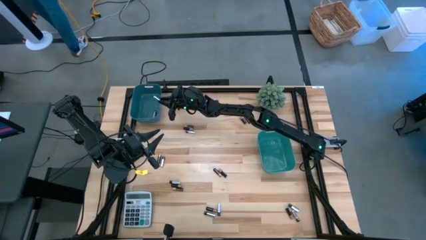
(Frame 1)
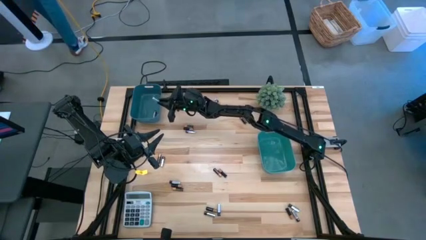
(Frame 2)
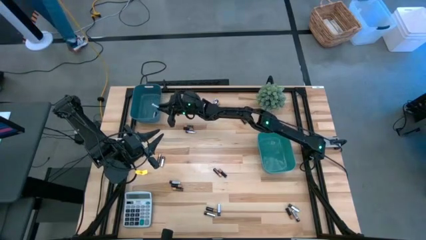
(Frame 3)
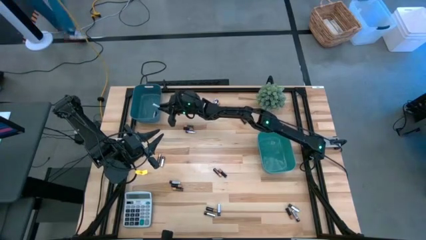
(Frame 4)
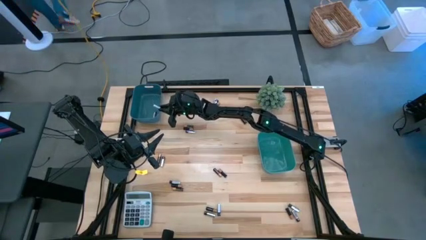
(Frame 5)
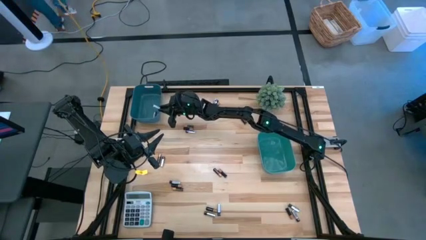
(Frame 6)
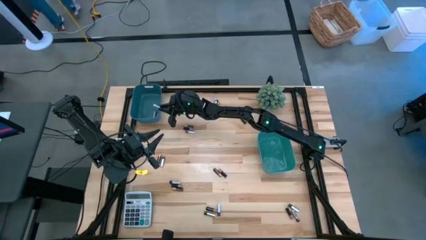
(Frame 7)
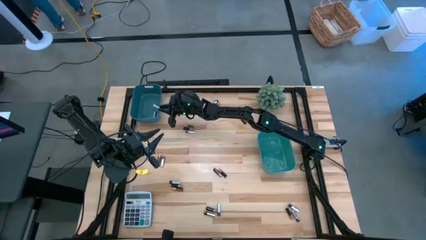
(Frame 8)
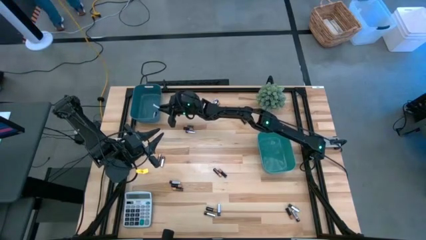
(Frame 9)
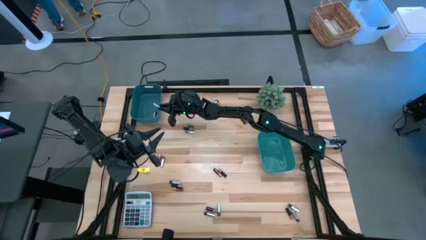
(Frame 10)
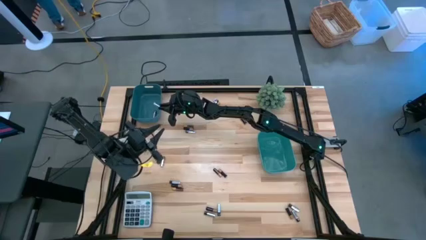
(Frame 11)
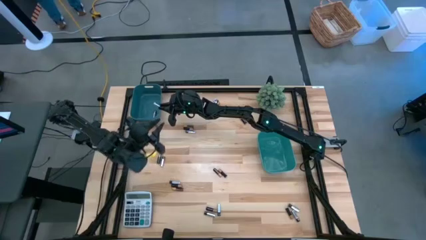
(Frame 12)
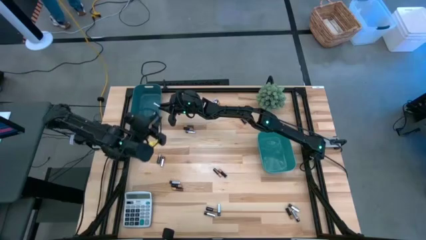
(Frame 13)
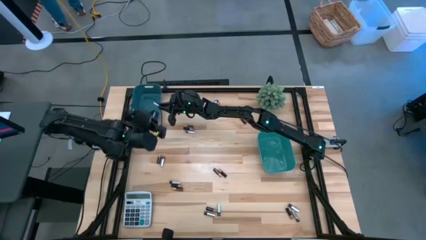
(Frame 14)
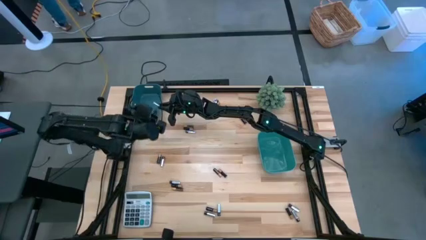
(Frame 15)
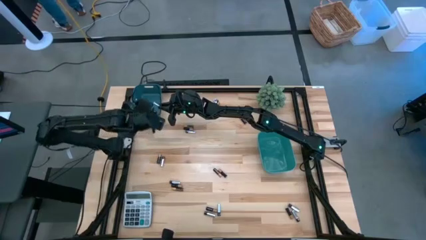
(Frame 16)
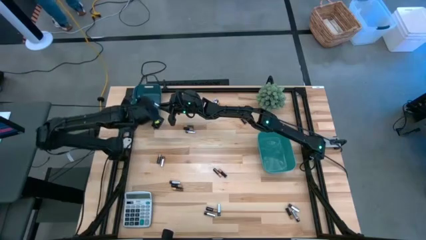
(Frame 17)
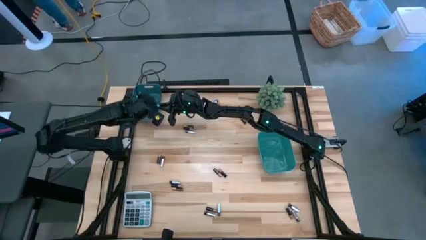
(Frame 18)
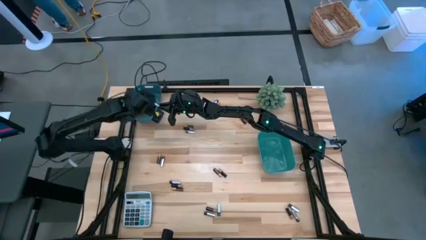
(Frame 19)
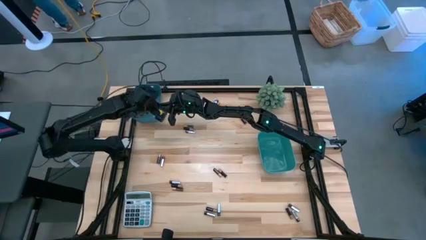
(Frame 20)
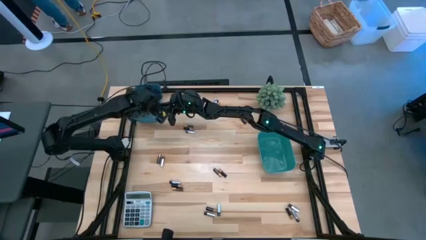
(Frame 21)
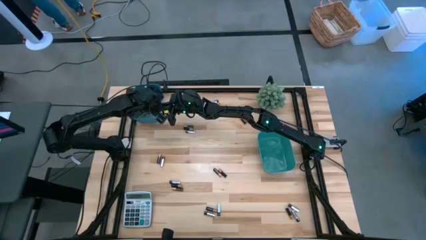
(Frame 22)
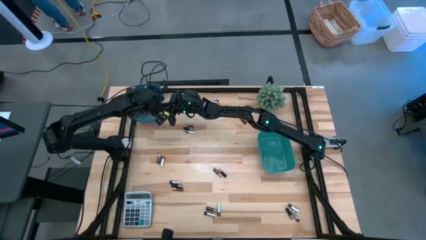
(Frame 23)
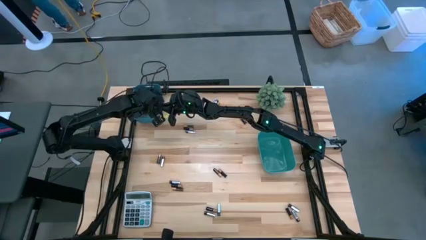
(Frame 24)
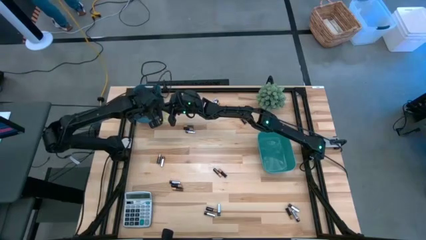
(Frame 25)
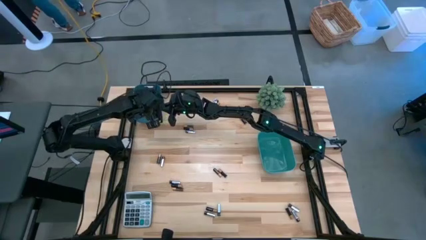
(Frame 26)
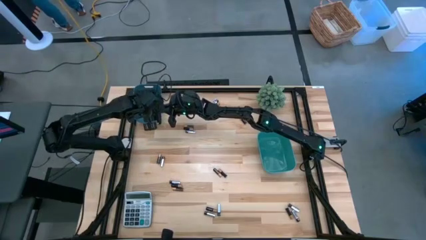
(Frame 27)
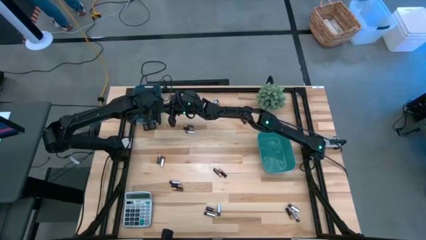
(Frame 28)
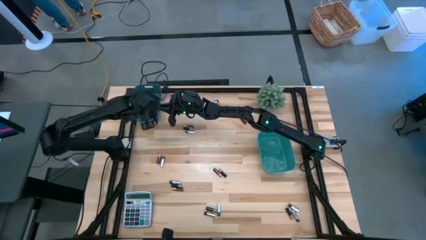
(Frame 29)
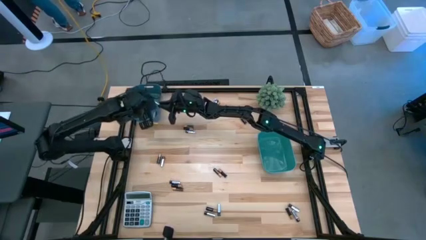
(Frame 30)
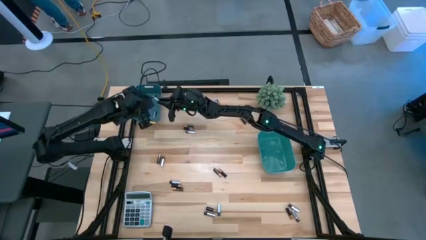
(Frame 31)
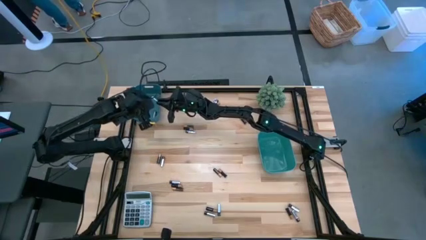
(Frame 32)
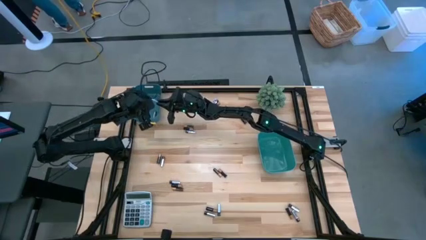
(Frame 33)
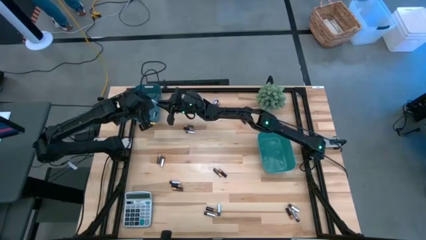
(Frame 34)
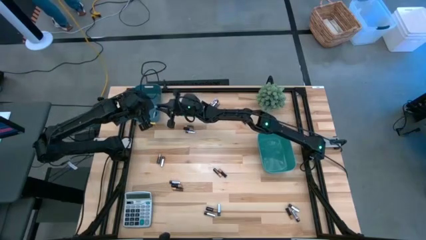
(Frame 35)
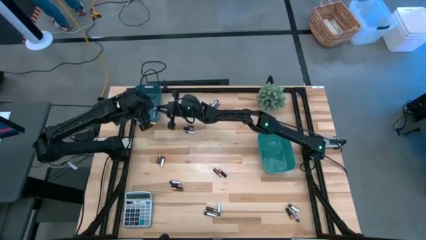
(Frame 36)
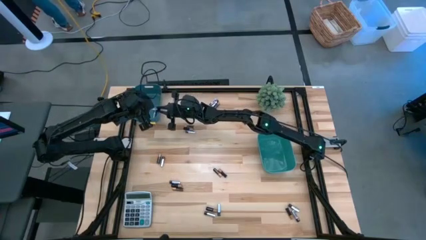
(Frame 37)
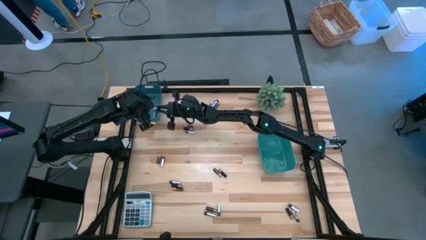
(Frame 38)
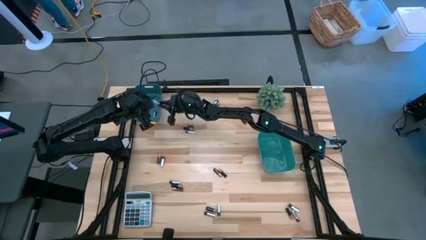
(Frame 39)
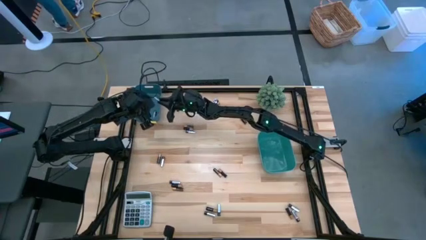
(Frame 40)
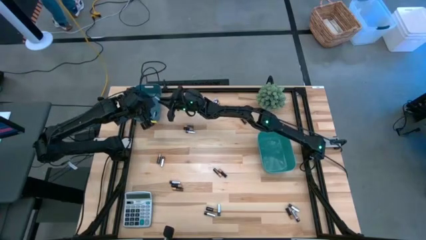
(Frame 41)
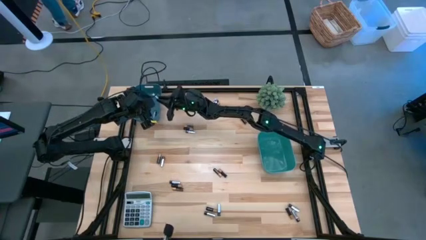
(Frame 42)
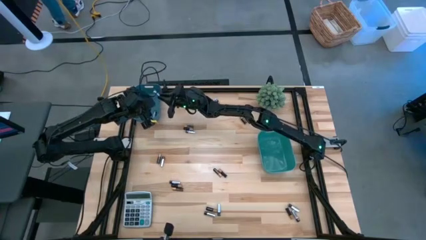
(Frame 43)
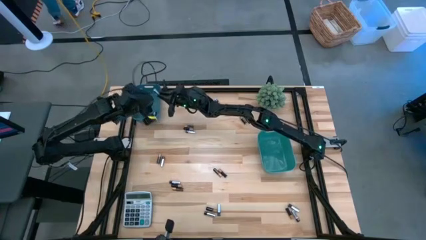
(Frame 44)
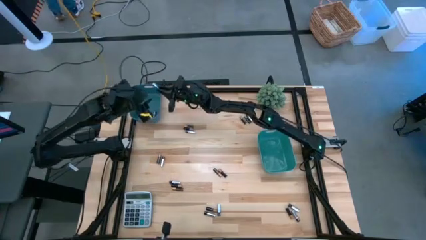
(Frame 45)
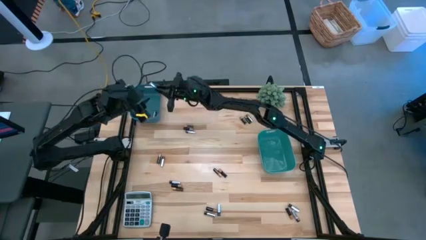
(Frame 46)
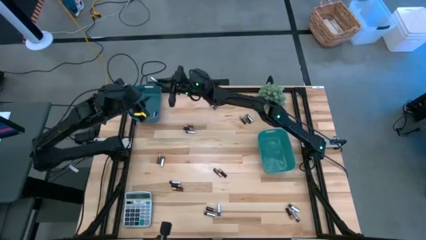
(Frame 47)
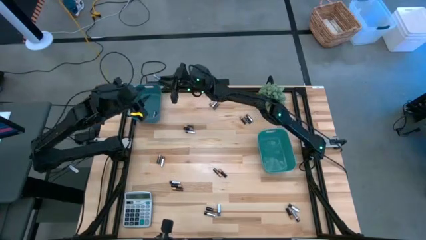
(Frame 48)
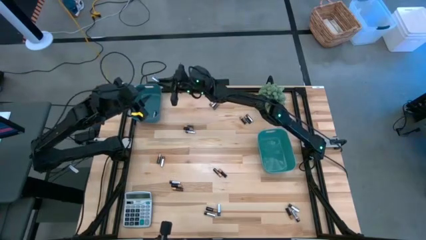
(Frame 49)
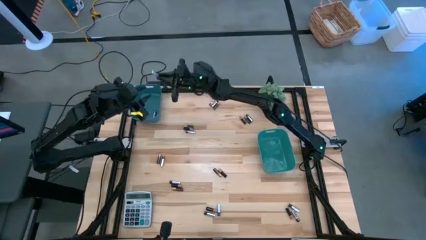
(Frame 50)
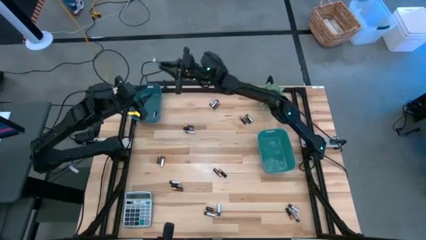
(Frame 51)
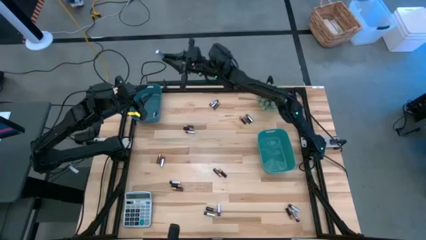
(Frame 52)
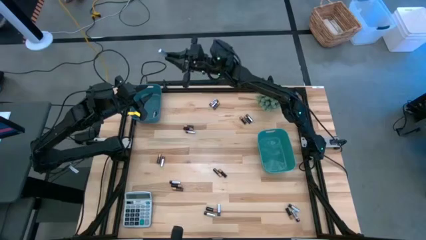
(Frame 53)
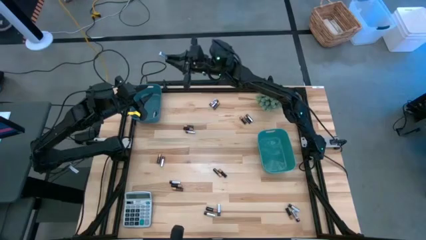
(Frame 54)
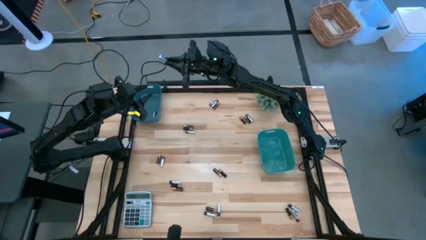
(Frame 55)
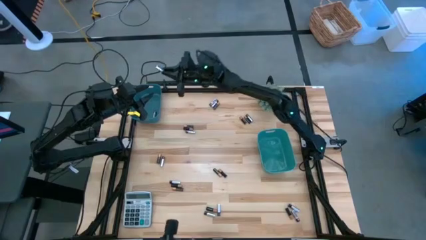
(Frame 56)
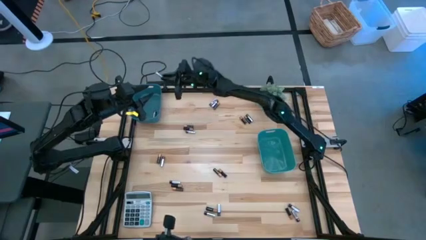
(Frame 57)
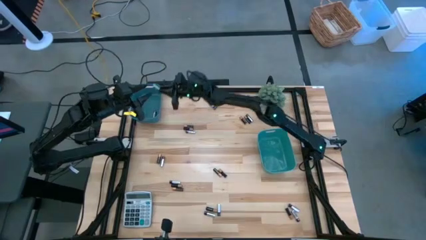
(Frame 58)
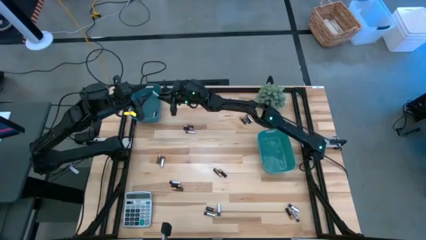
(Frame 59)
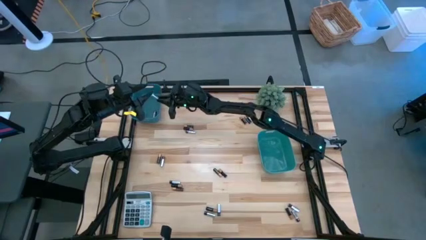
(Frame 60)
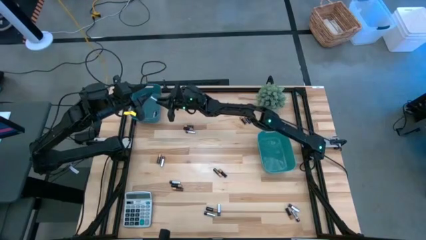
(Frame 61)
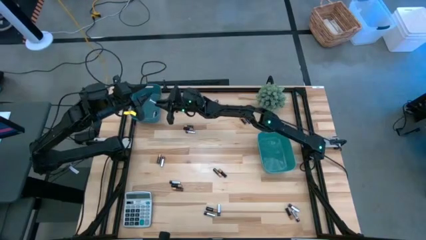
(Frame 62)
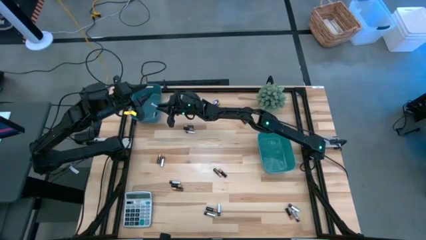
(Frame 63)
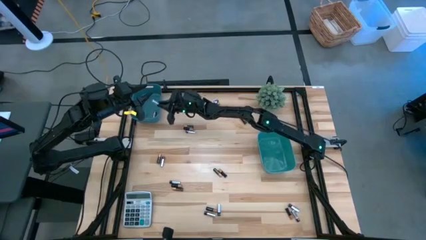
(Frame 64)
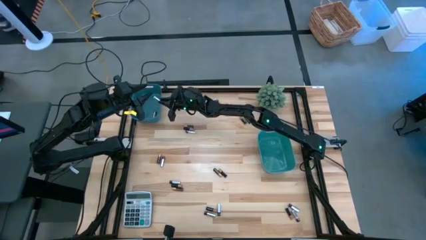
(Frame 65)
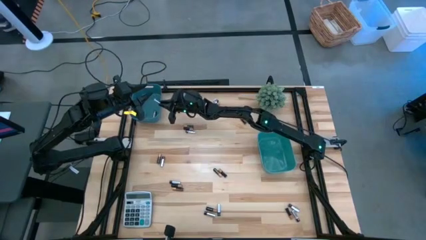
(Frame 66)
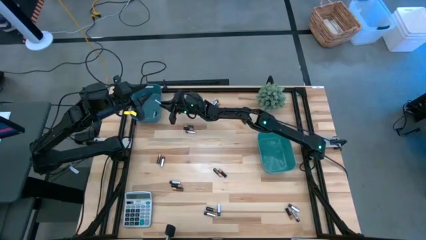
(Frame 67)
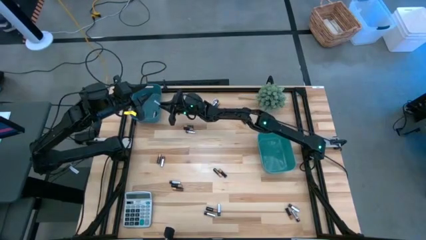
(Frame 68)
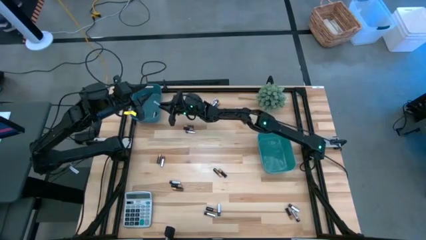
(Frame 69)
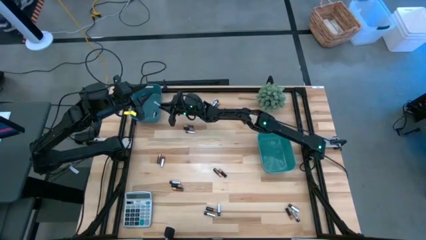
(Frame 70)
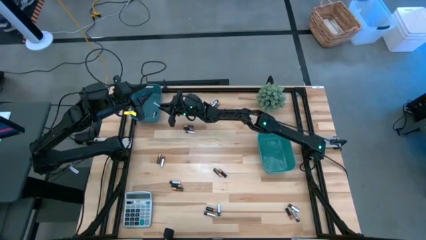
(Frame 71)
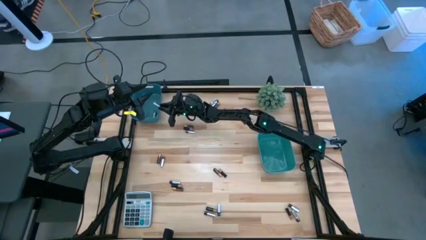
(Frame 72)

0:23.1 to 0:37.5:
Task: Sort batteries
Put the black-silver battery into the blue bin
